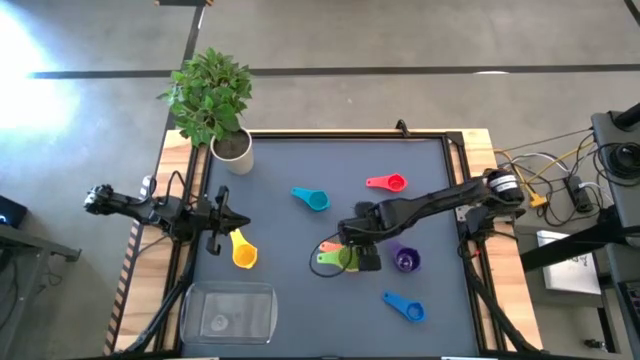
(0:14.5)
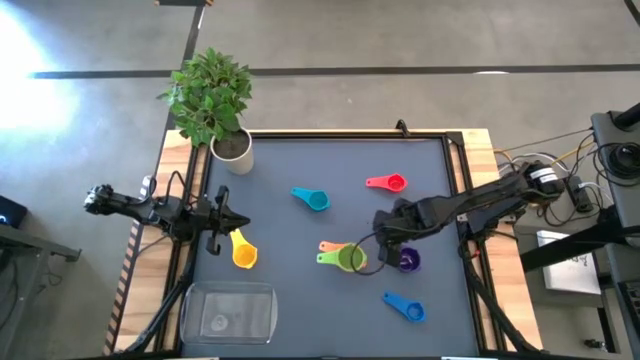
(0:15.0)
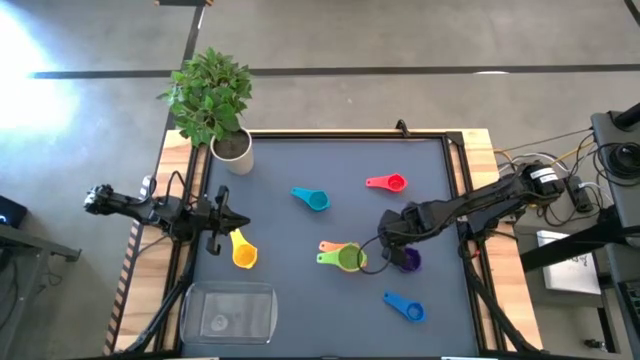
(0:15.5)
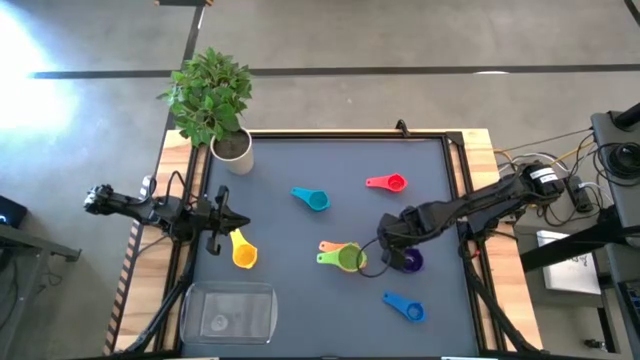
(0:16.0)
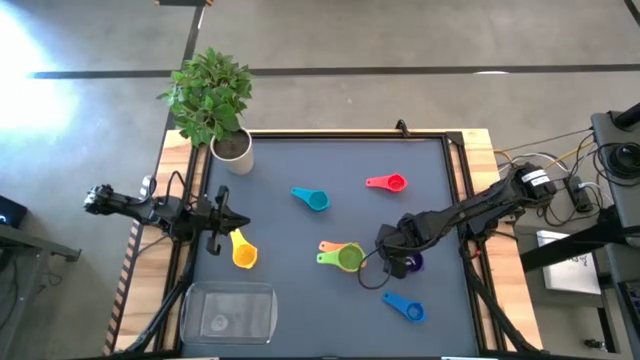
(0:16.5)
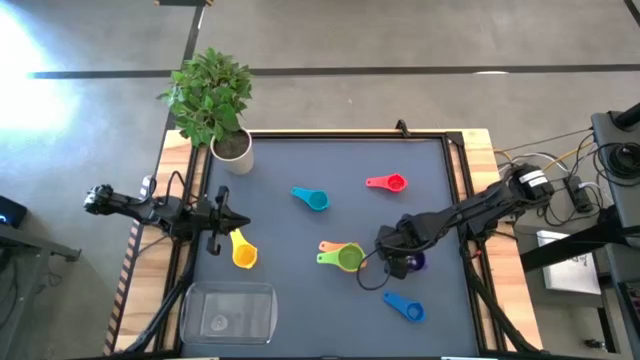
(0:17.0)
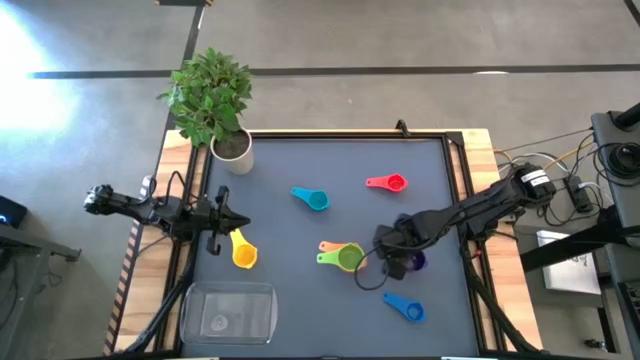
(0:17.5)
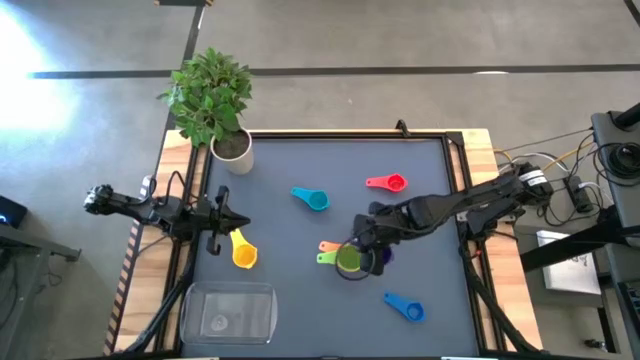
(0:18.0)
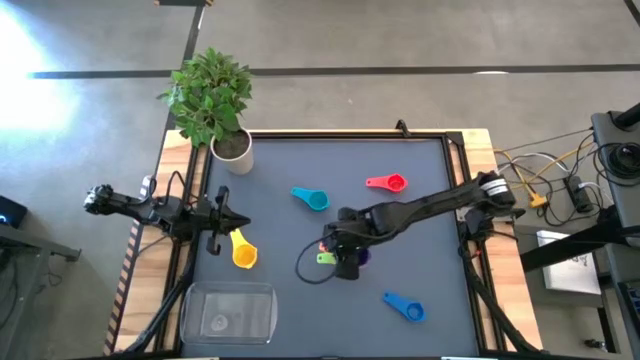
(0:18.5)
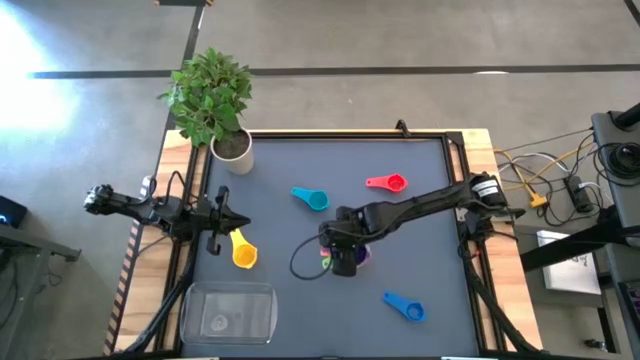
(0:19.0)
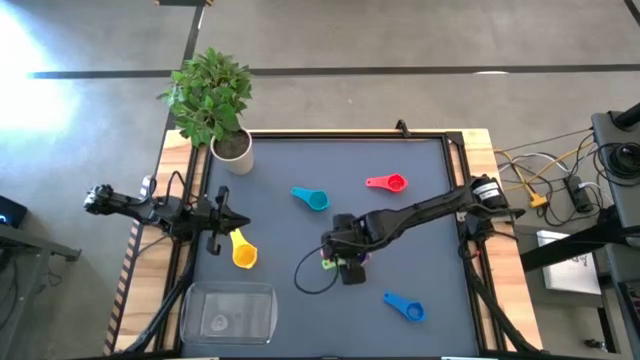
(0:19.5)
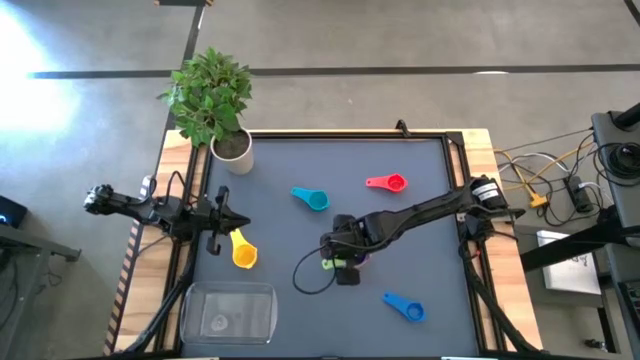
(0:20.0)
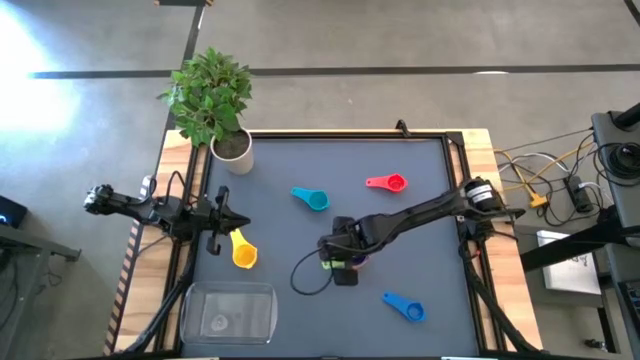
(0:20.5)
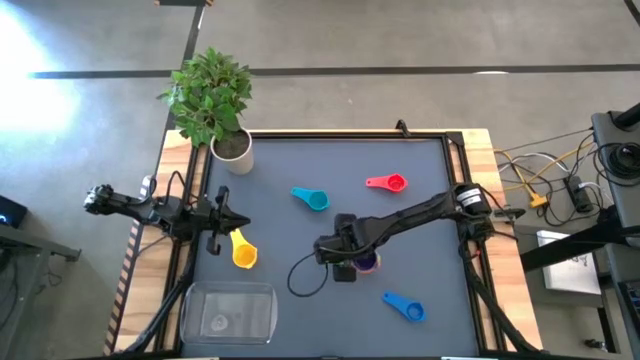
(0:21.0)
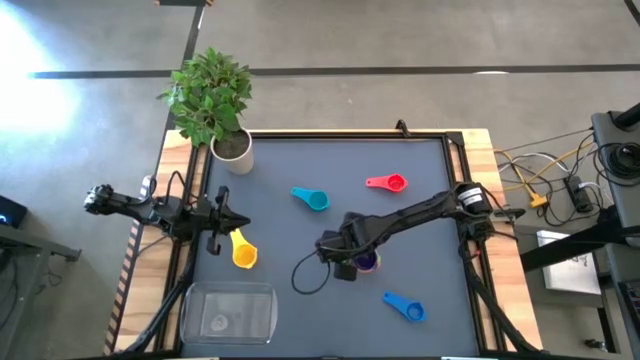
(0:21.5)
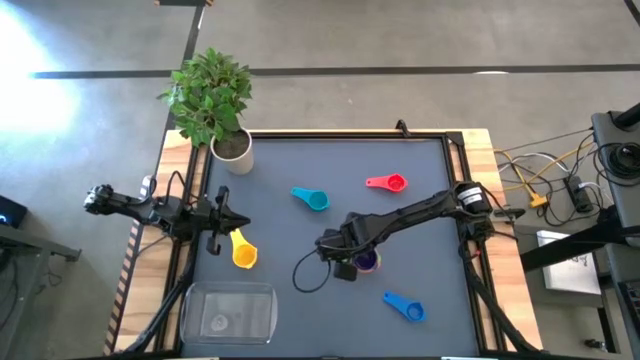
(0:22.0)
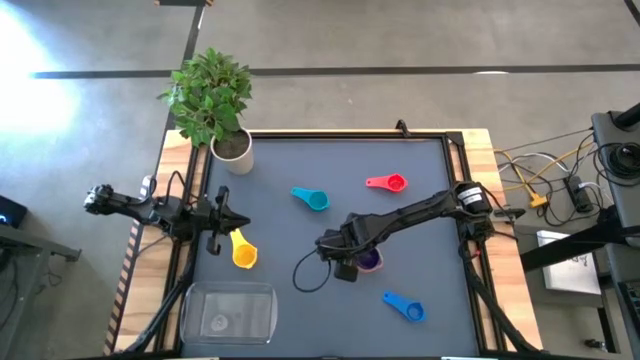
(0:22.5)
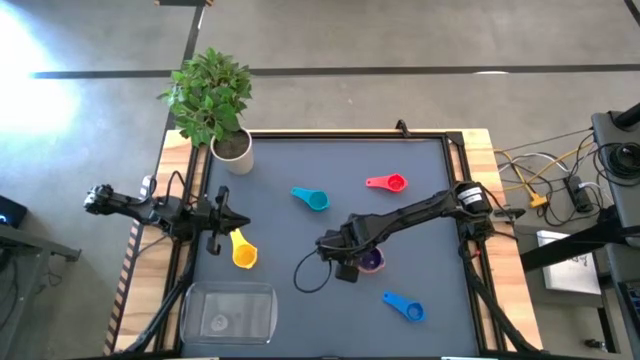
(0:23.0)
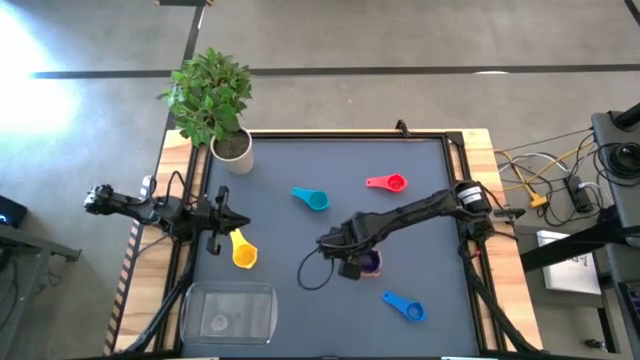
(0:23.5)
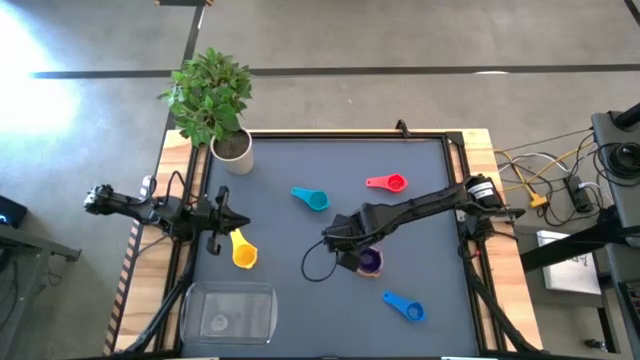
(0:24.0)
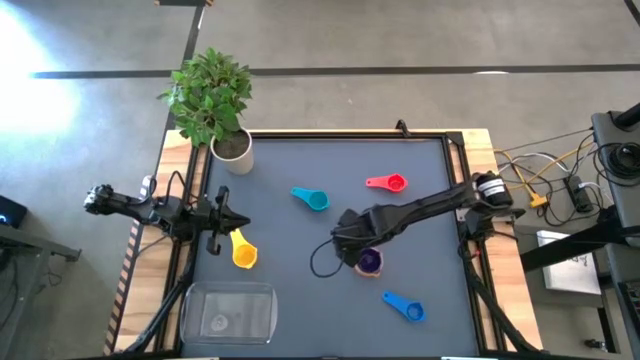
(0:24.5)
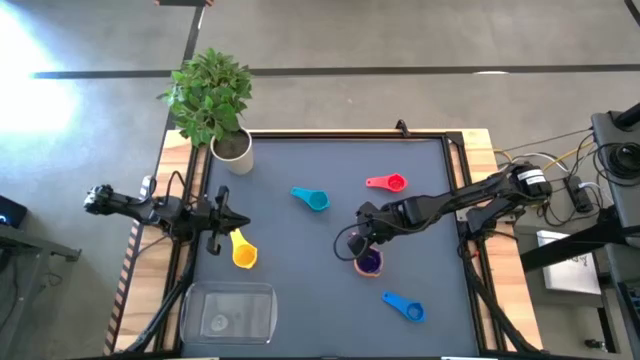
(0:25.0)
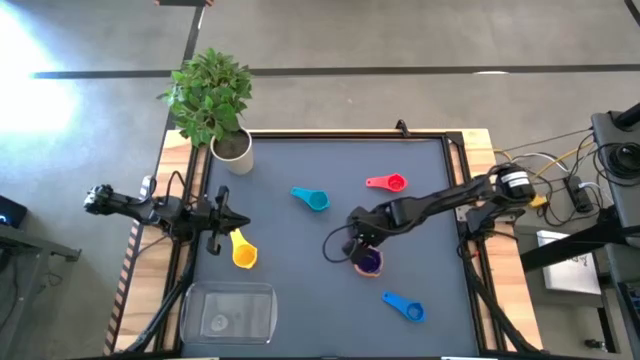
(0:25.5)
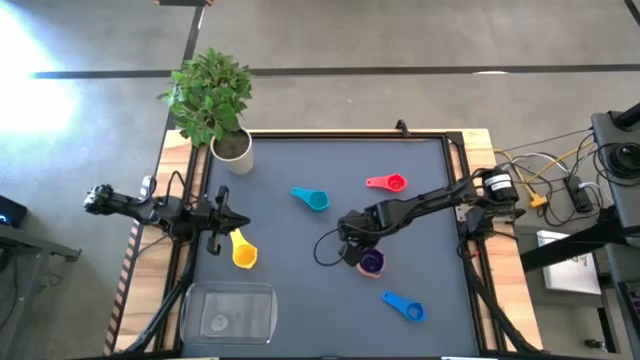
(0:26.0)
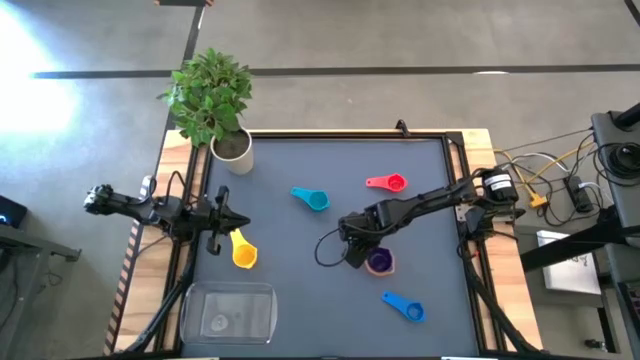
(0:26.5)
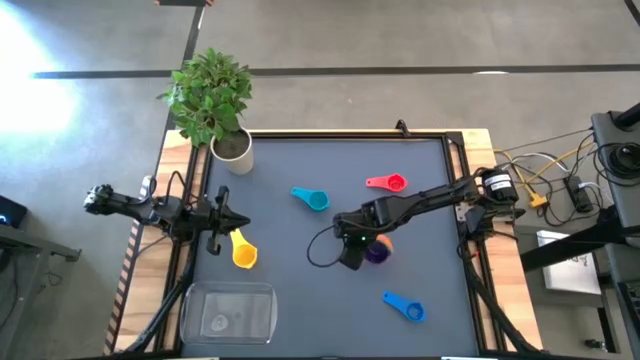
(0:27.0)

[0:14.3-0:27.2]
Task: Nest measuring cups in basket
Stack the purple measuring cup into the green measuring cup

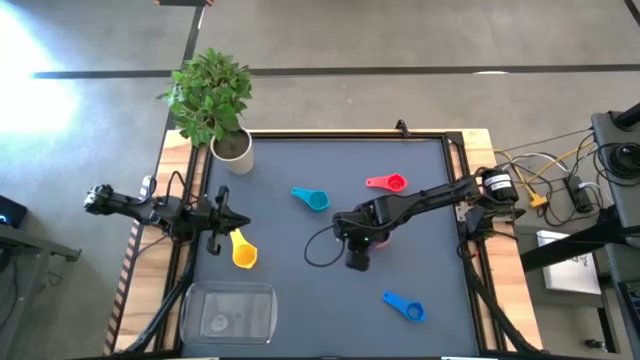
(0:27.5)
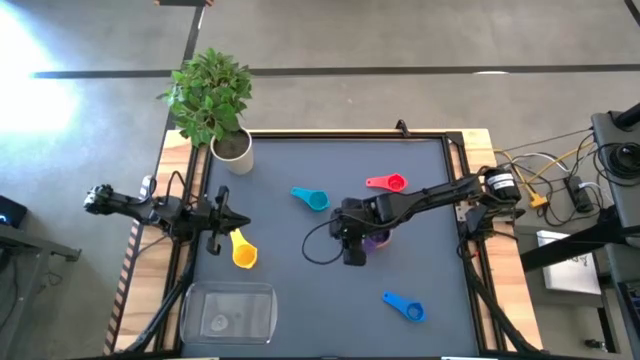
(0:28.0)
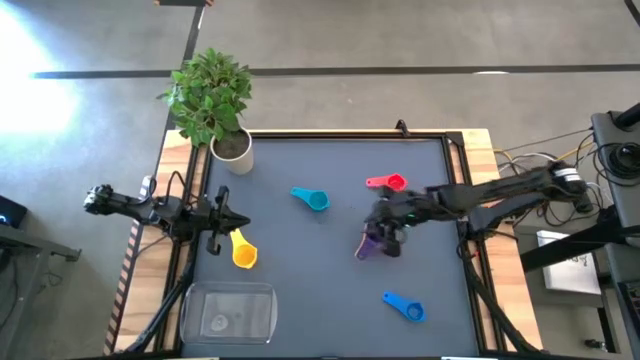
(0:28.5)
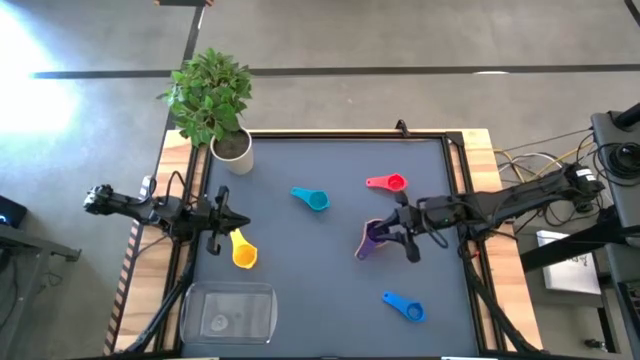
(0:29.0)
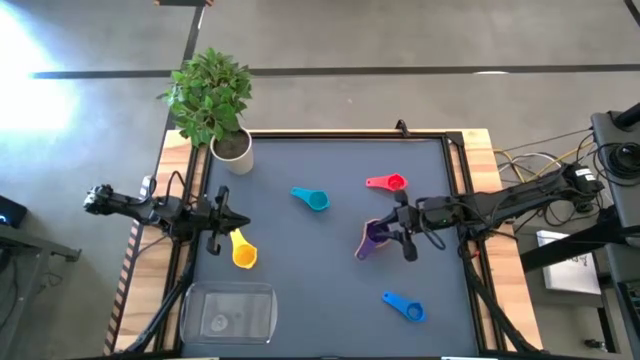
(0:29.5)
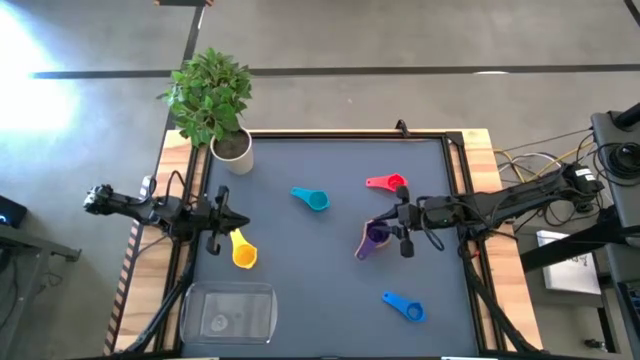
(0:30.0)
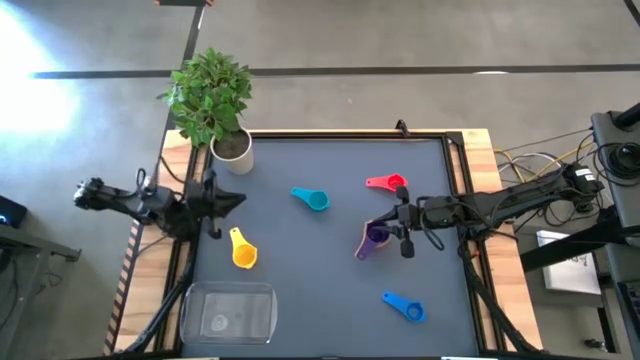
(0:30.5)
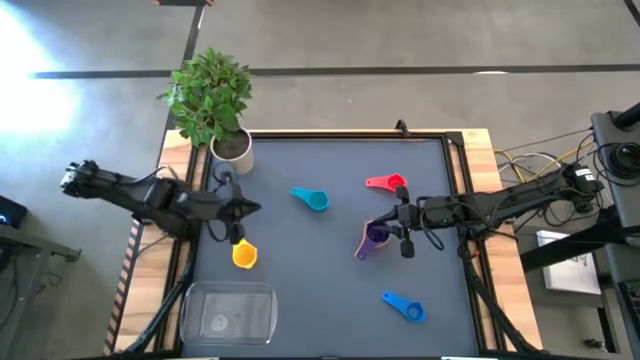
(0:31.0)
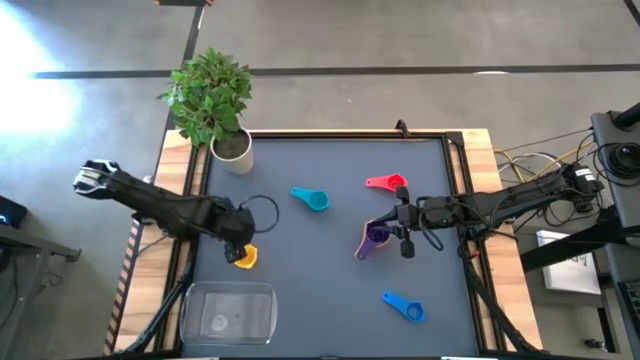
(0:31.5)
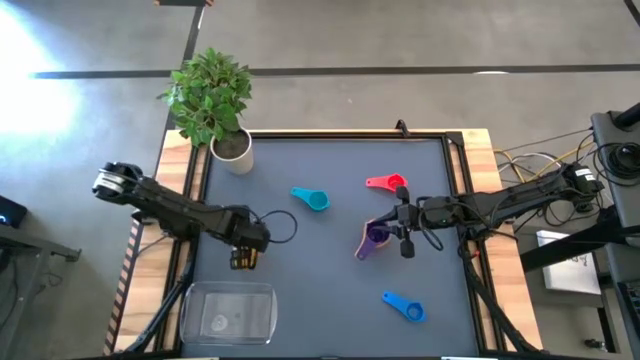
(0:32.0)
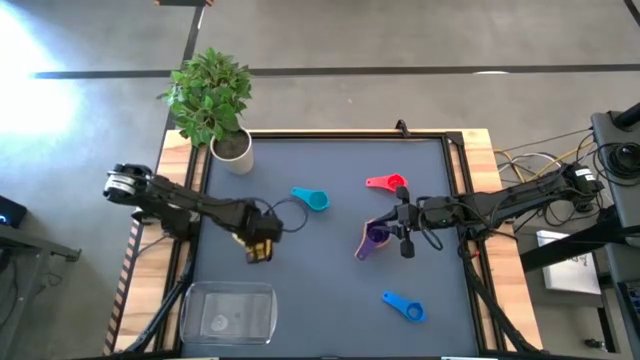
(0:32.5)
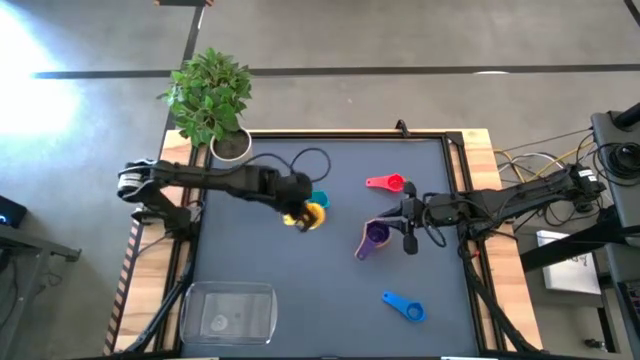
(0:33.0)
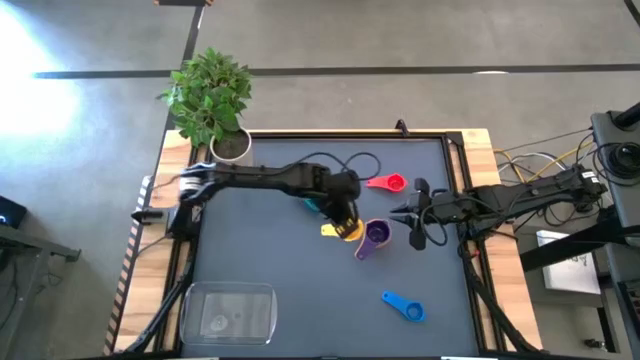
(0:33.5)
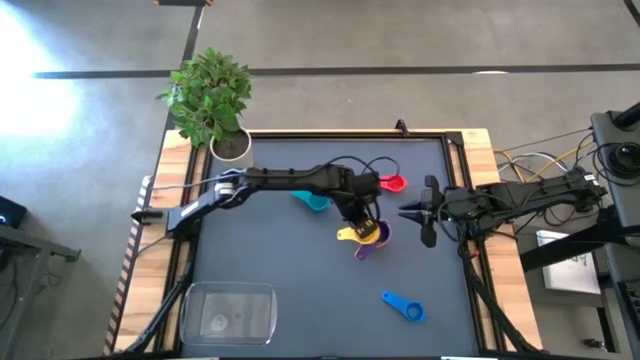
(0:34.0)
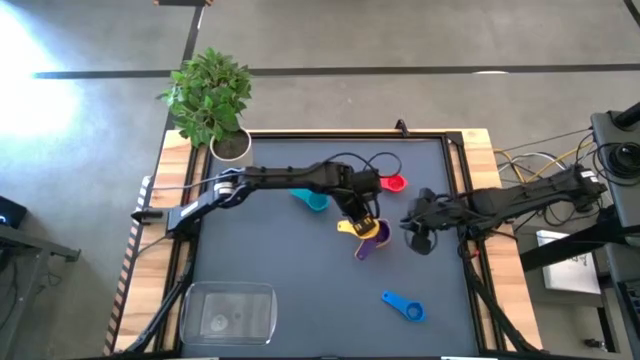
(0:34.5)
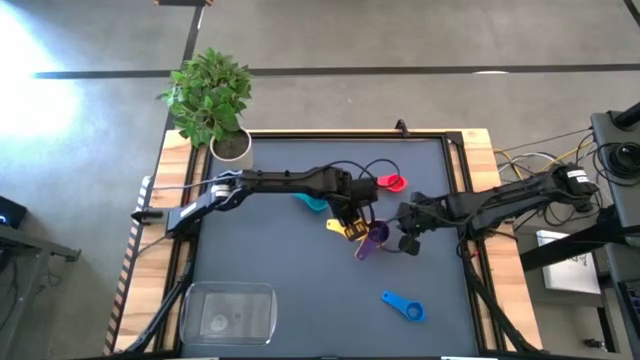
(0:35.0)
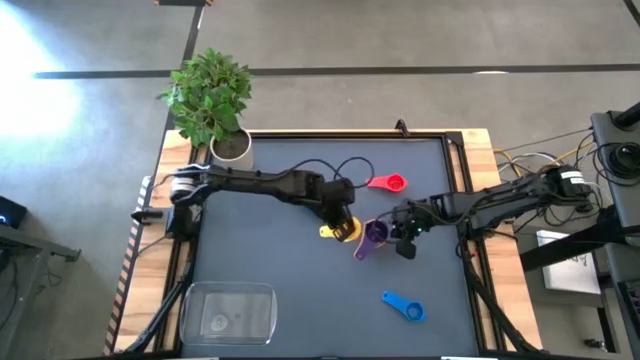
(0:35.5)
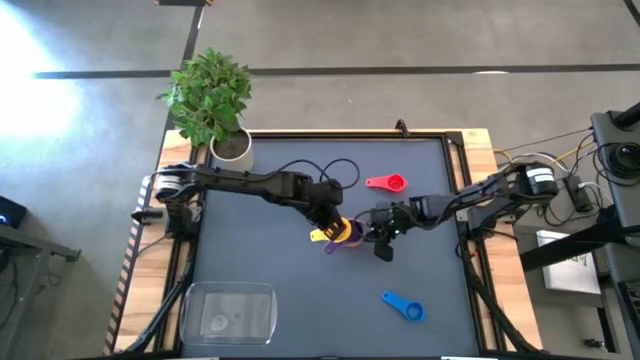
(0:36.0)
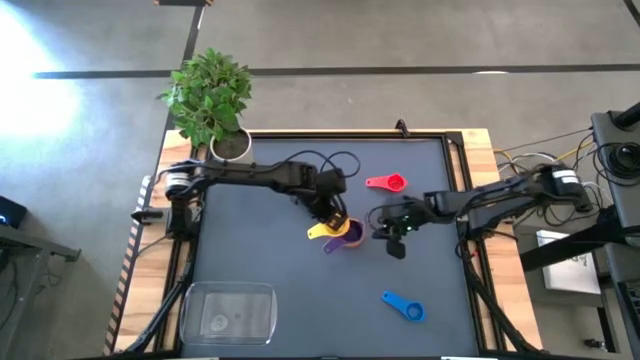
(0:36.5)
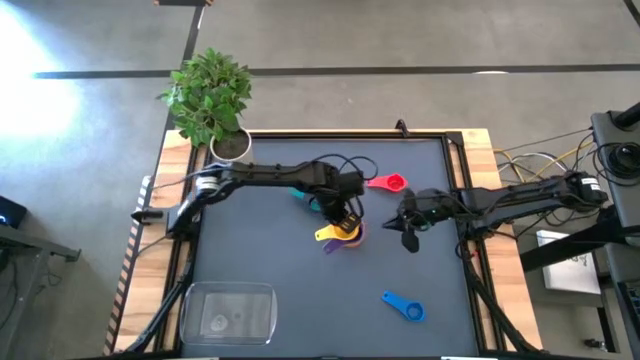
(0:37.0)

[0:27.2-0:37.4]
Stack the yellow measuring cup into the purple measuring cup
